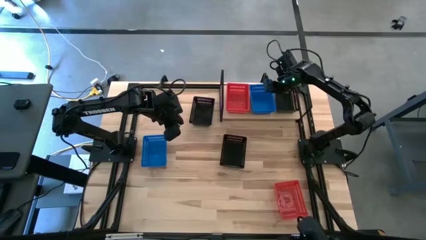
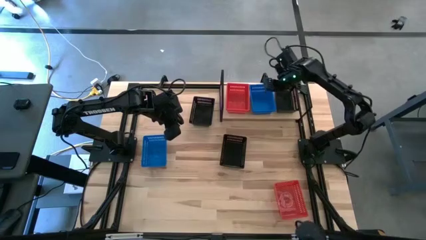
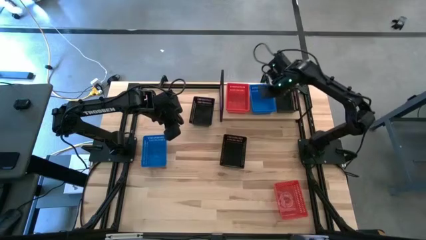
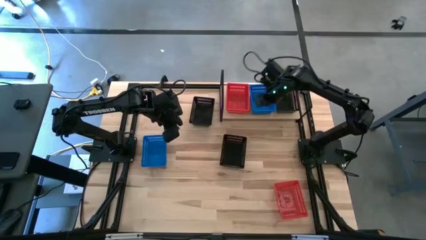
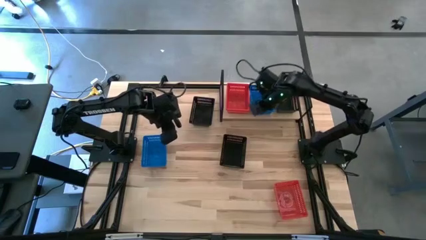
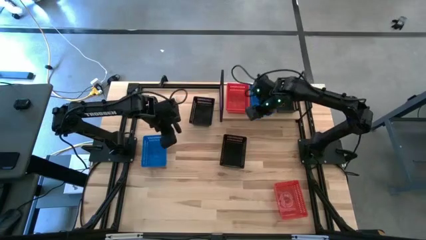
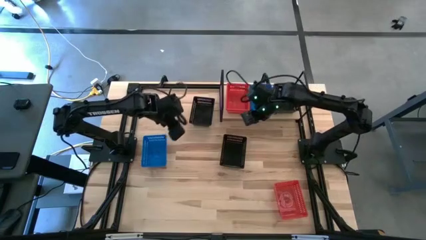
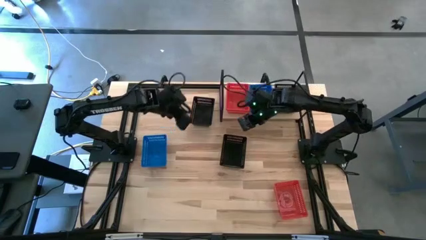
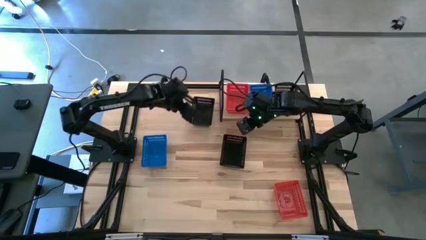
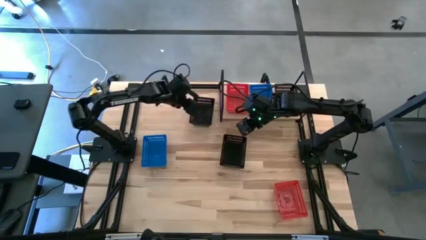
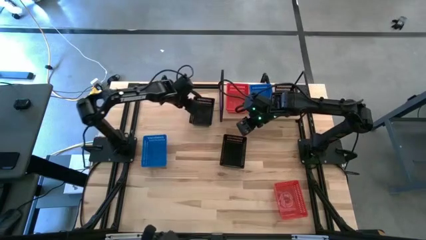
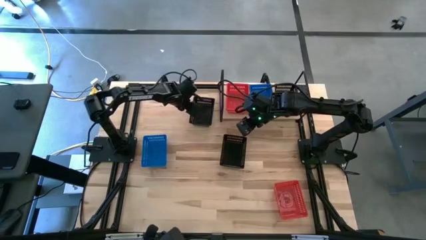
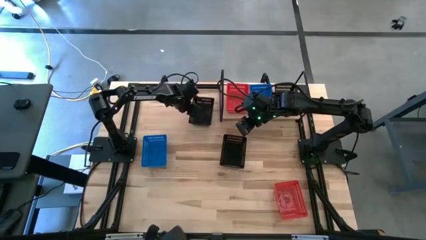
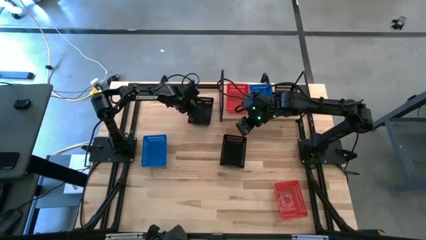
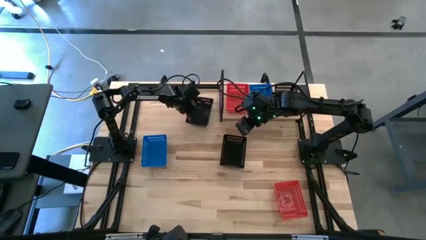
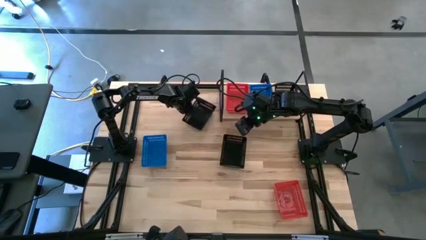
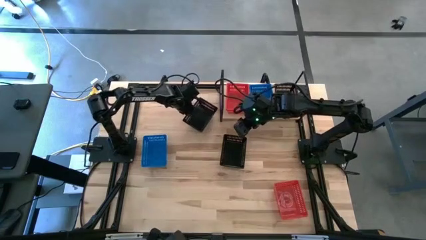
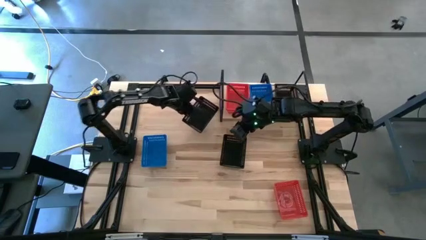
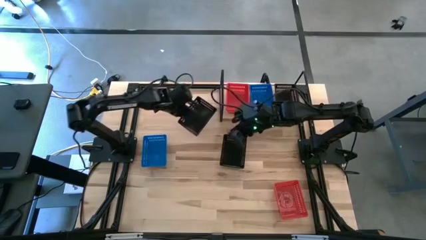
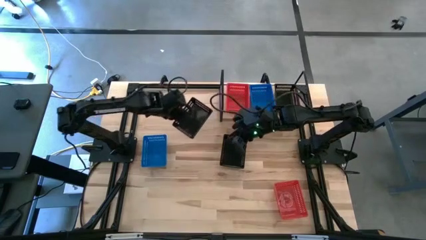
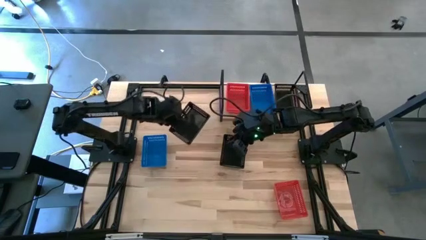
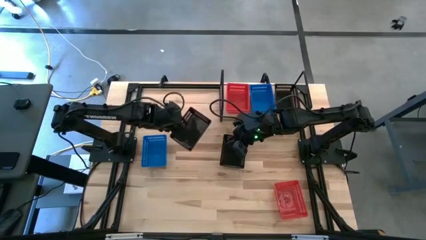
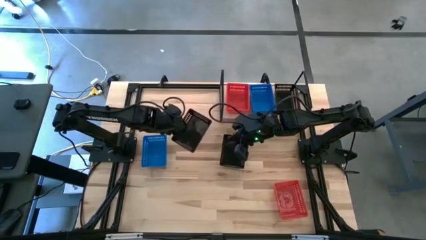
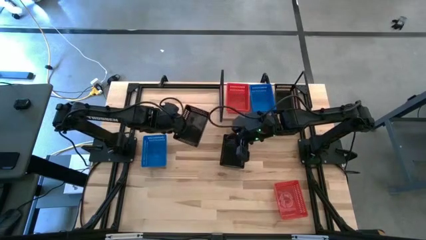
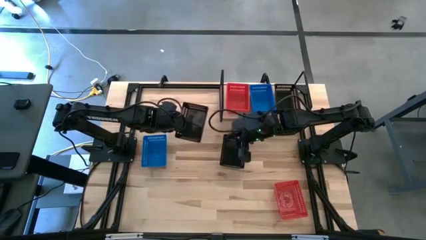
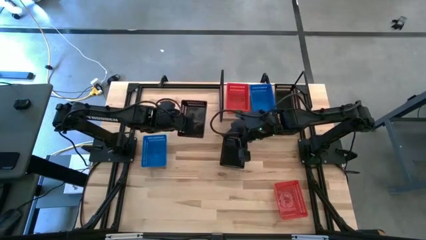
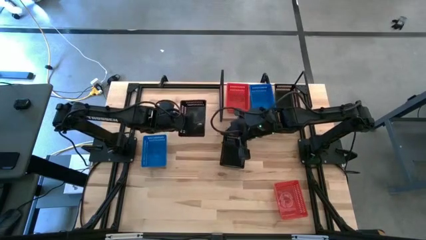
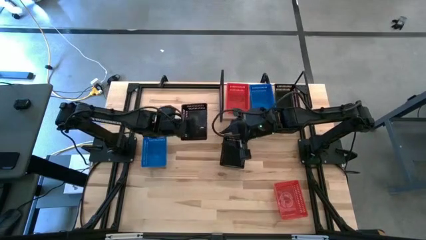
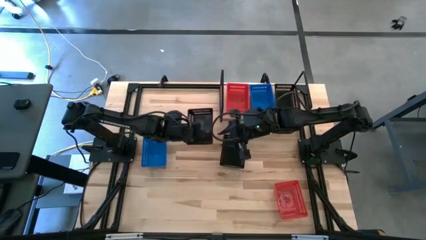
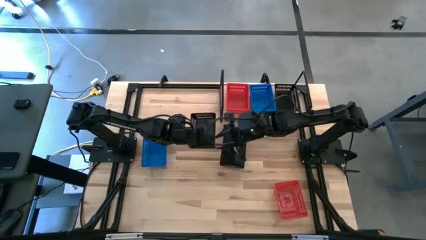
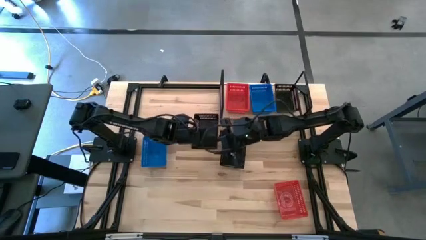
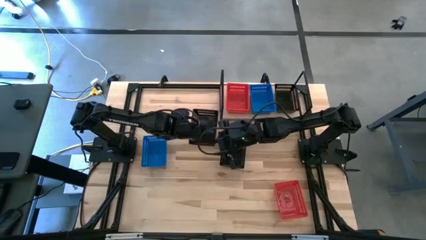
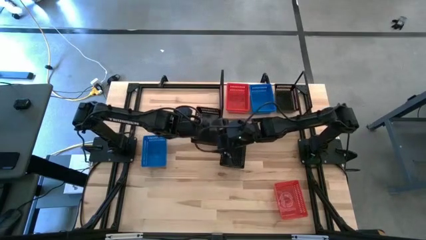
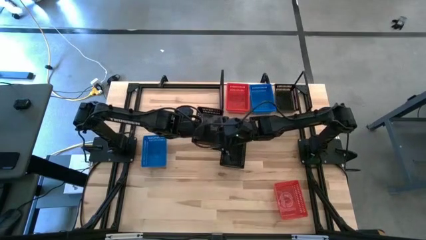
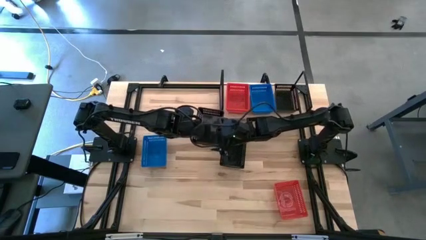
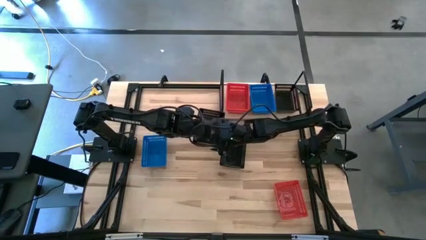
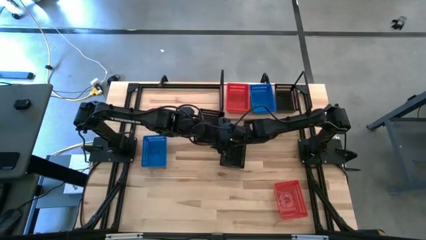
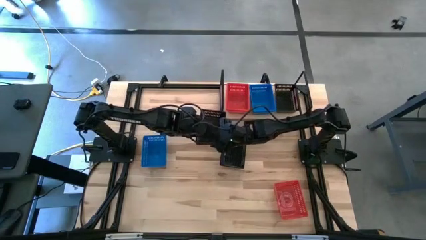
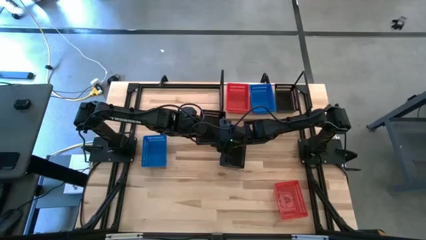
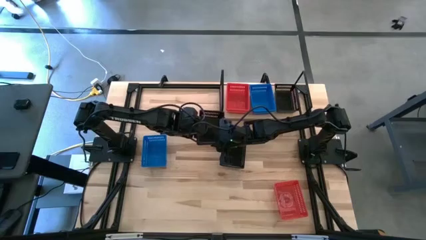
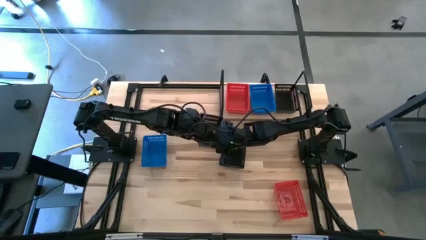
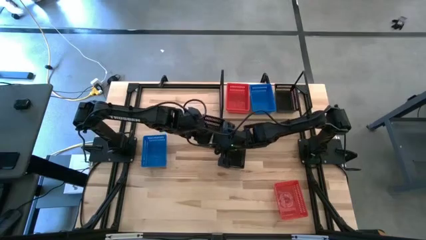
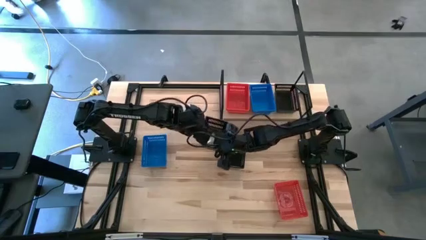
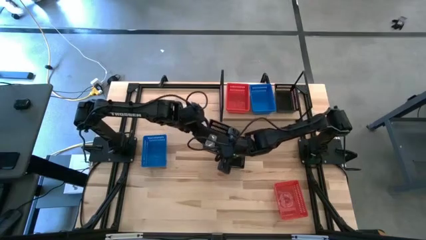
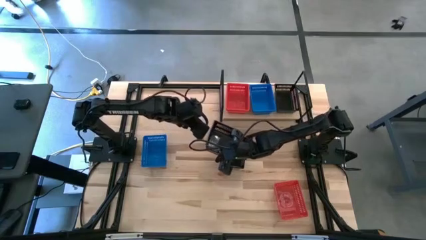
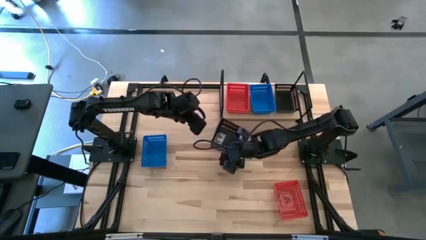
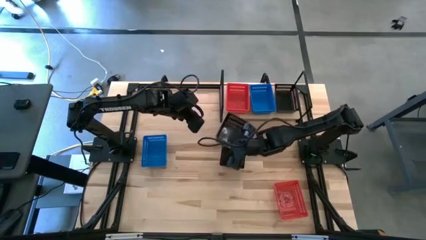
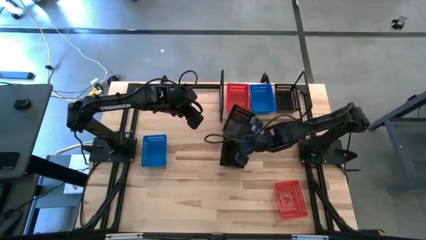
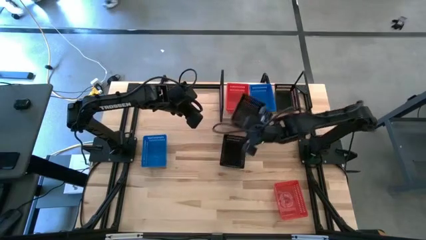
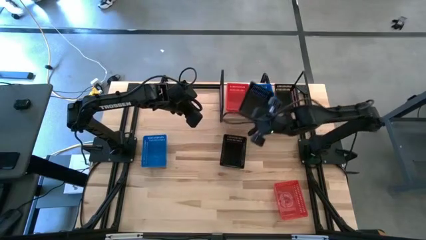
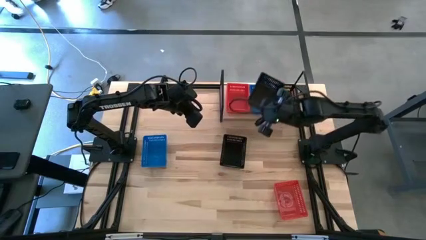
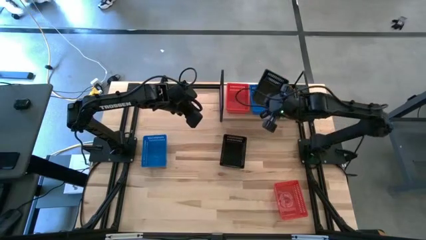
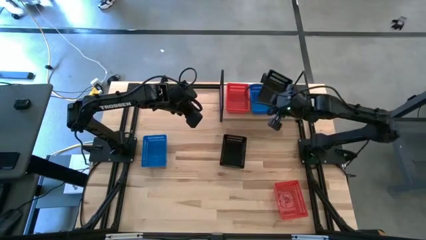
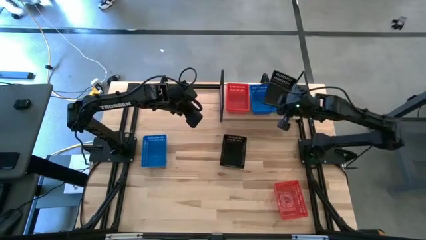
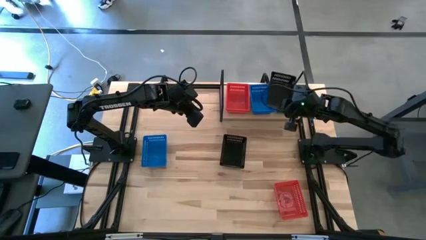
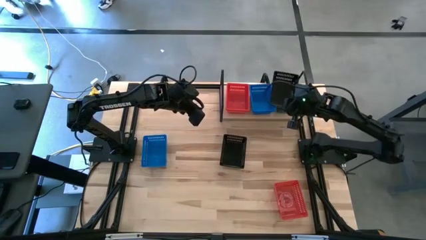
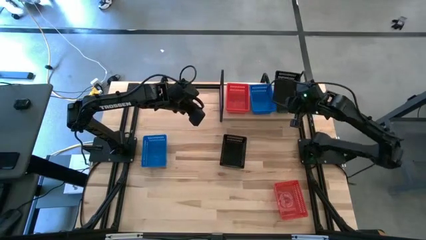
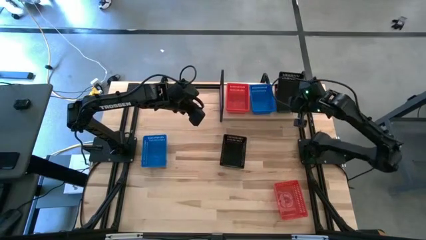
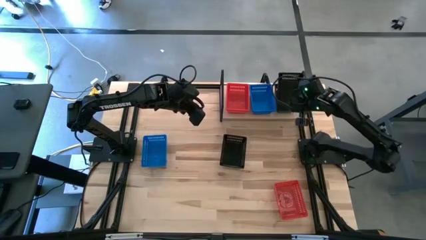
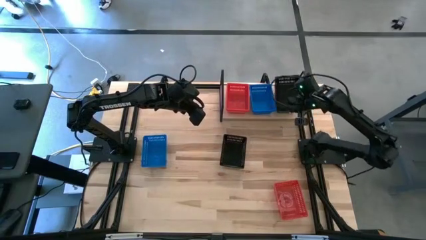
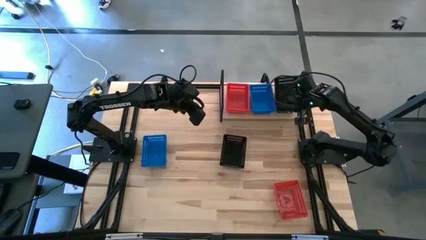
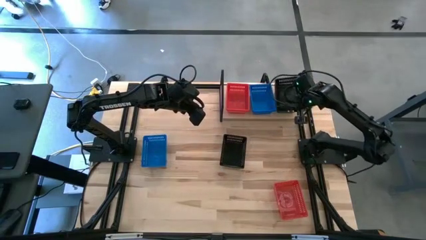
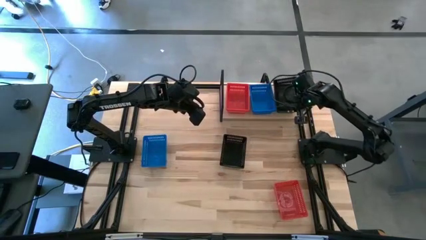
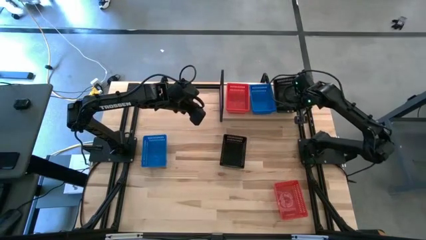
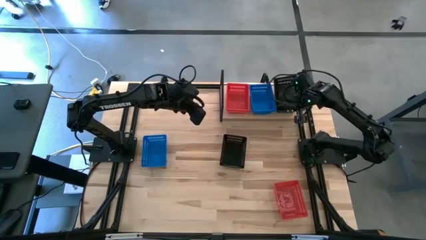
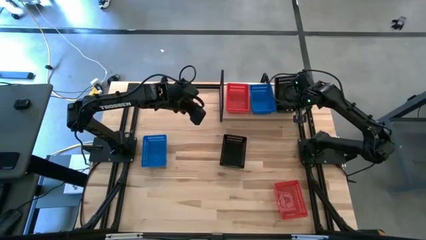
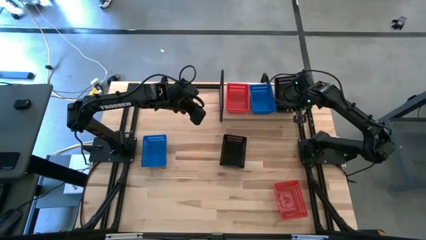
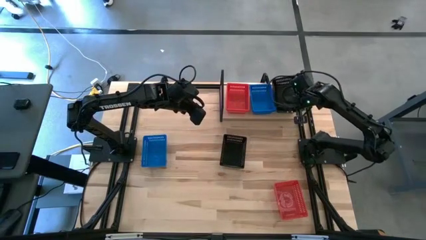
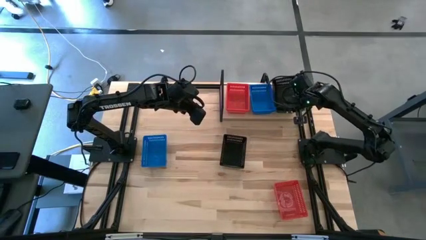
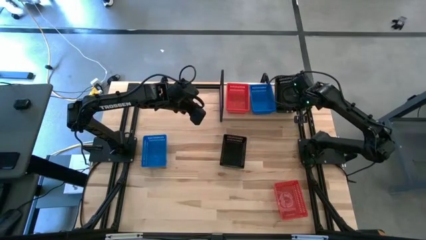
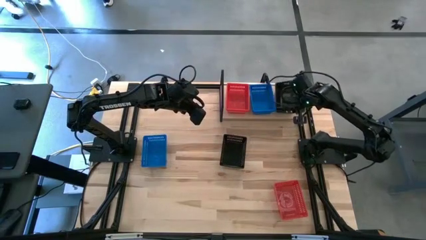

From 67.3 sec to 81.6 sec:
Task: Stack baskets on shelf by color
Stack the top black bin on the other black bin on the shelf

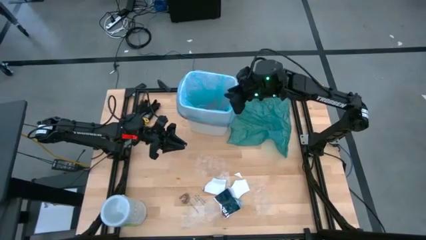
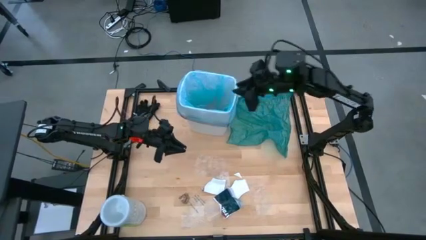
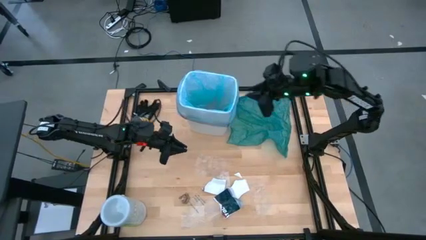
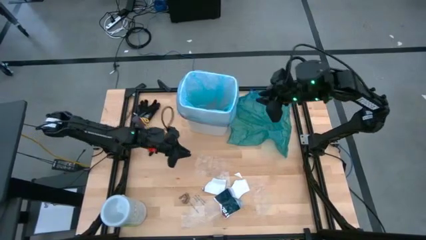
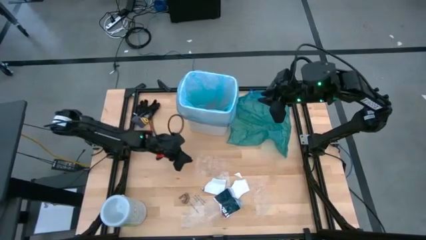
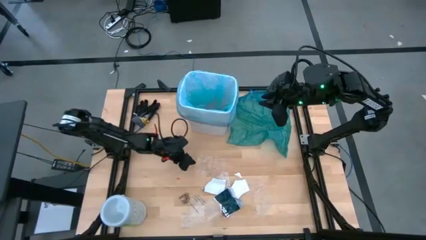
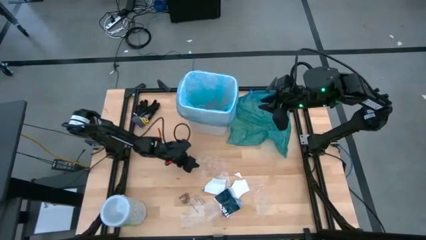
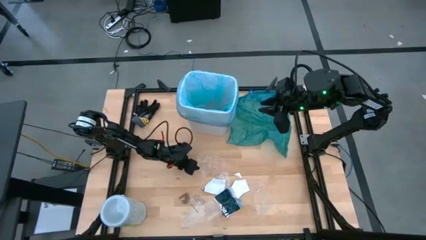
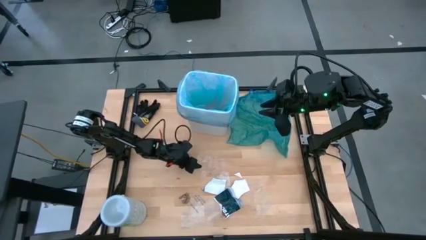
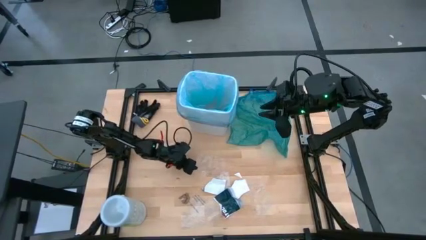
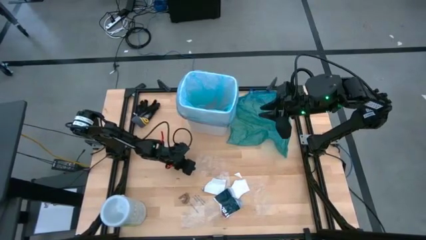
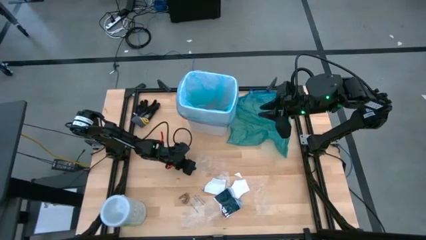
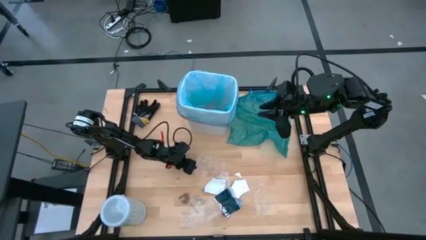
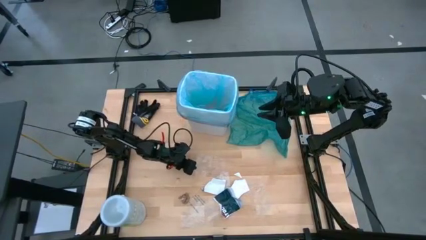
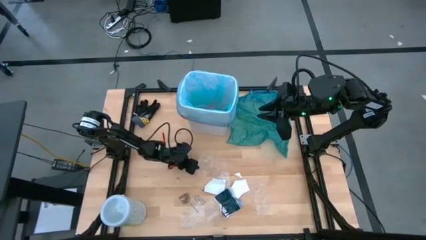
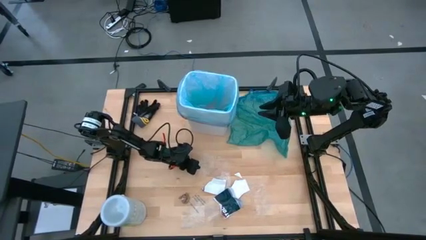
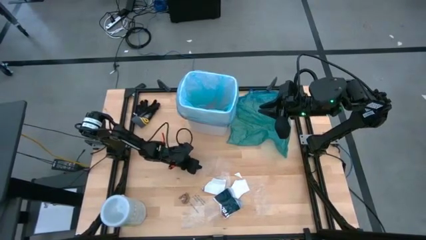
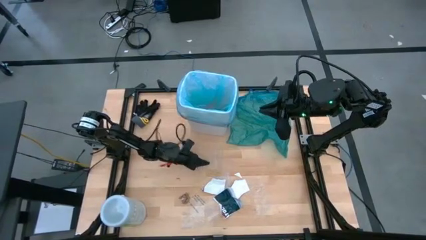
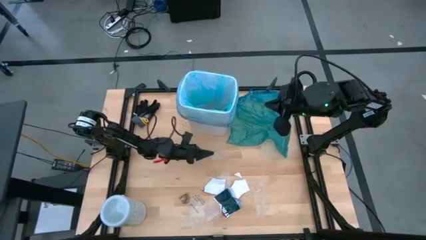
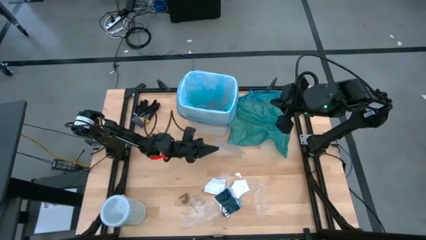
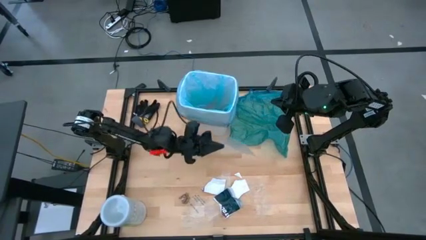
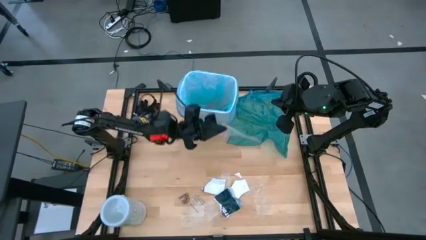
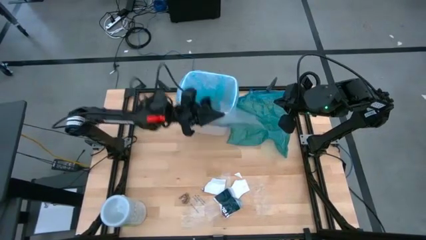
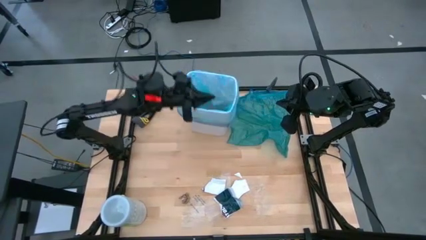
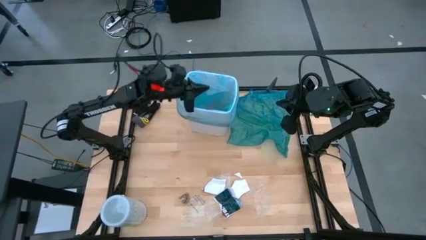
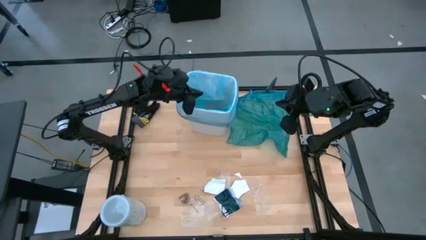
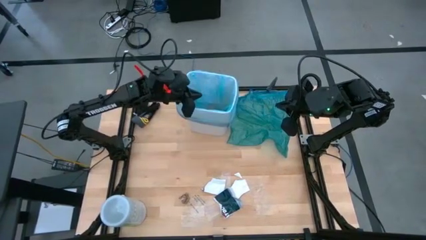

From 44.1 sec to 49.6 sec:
Task: place trash/remove bag and relplace
Put the transparent plastic into the trash bin
